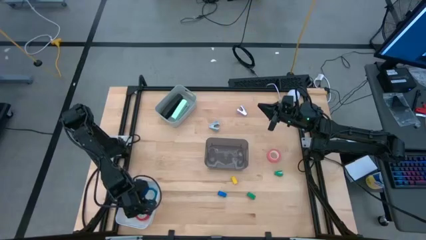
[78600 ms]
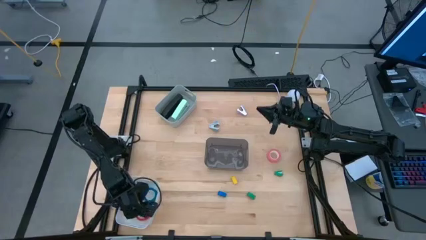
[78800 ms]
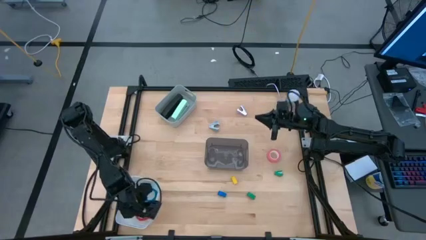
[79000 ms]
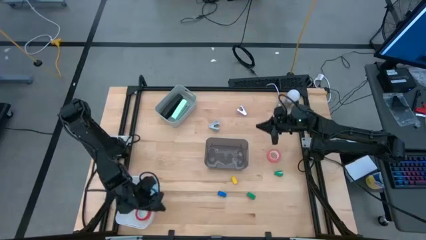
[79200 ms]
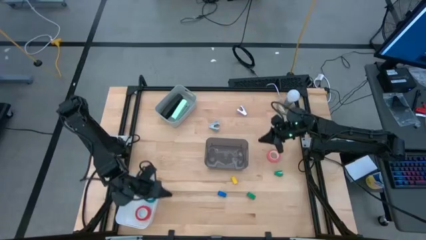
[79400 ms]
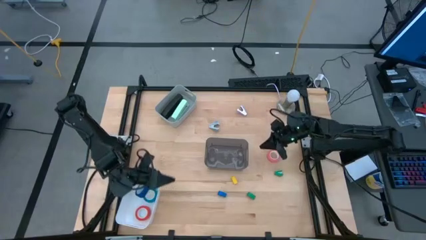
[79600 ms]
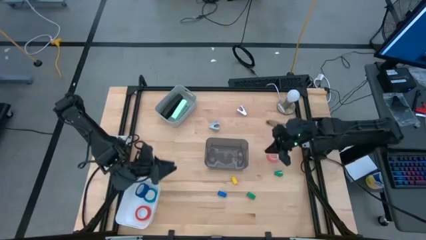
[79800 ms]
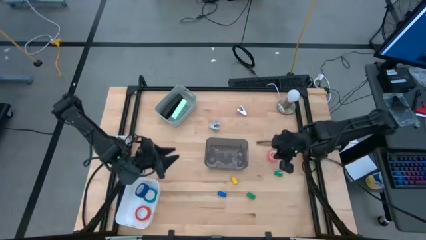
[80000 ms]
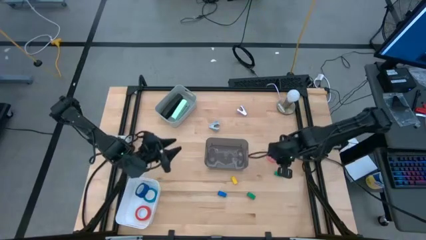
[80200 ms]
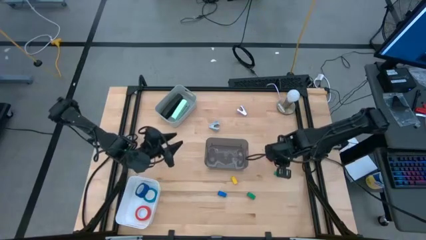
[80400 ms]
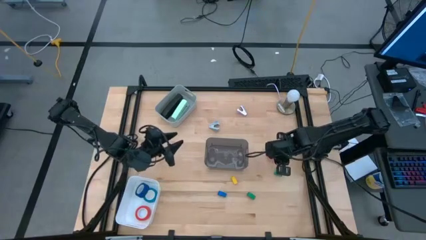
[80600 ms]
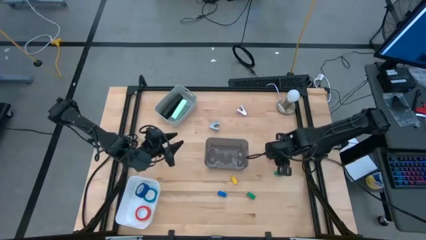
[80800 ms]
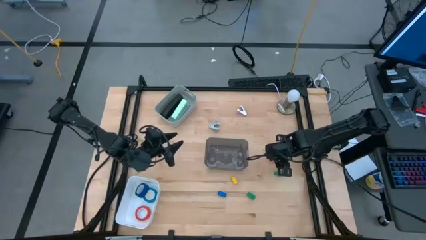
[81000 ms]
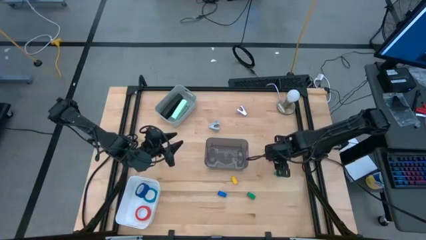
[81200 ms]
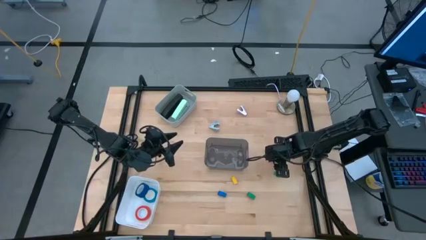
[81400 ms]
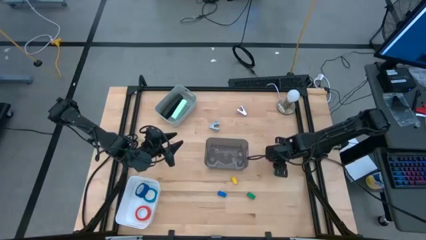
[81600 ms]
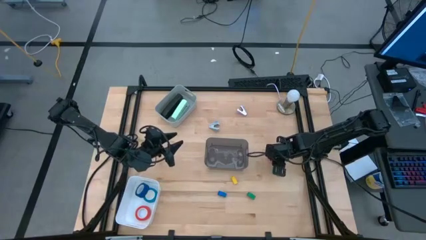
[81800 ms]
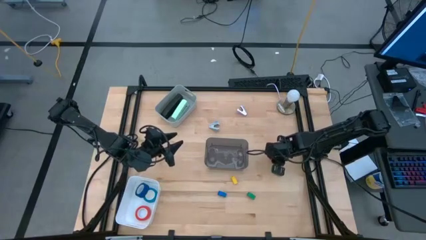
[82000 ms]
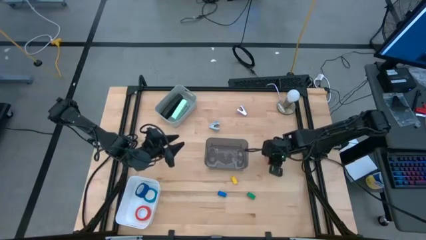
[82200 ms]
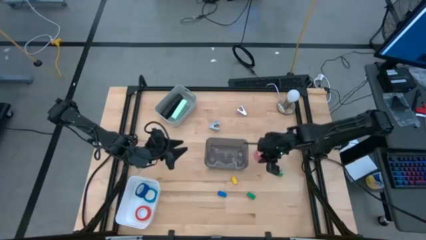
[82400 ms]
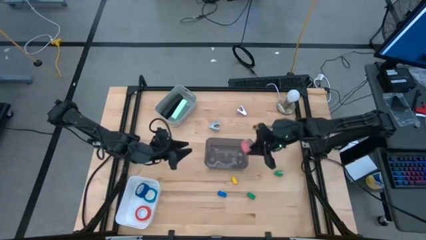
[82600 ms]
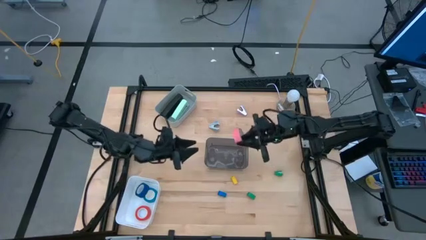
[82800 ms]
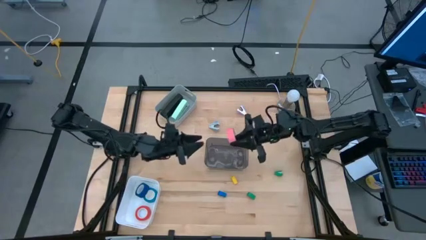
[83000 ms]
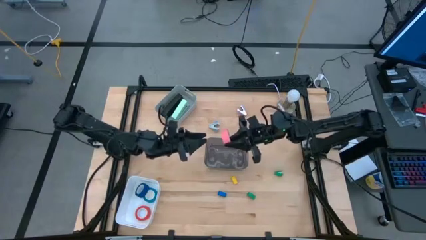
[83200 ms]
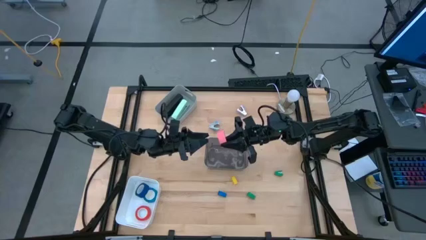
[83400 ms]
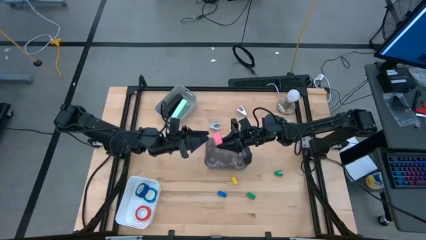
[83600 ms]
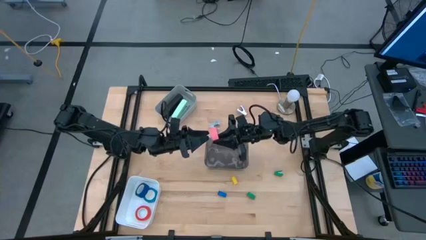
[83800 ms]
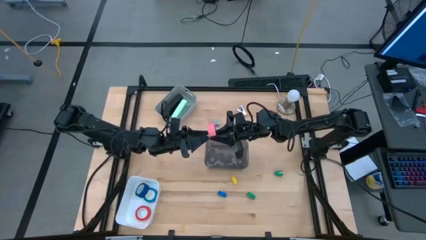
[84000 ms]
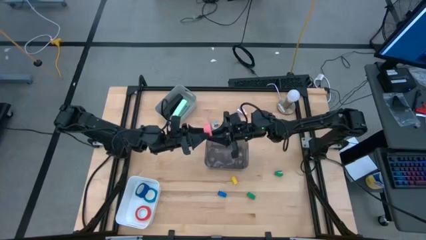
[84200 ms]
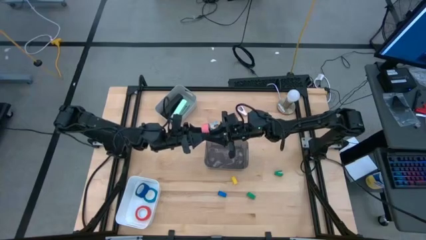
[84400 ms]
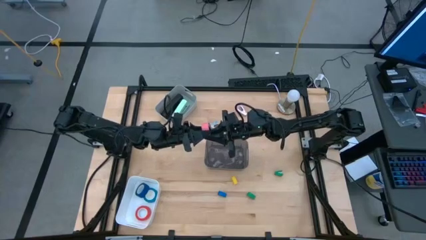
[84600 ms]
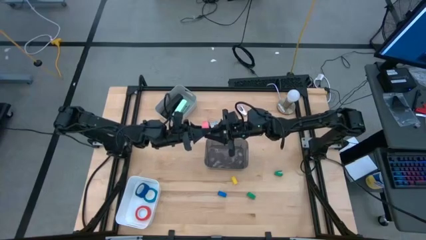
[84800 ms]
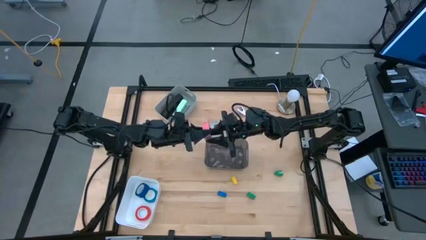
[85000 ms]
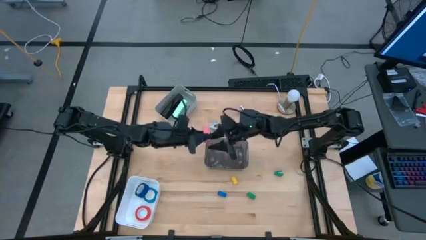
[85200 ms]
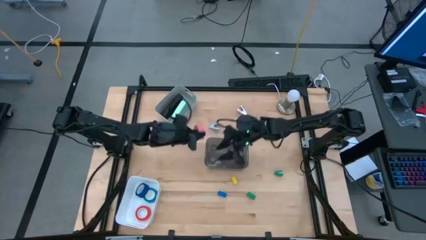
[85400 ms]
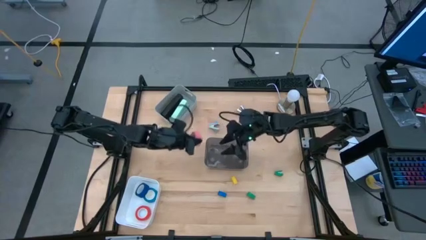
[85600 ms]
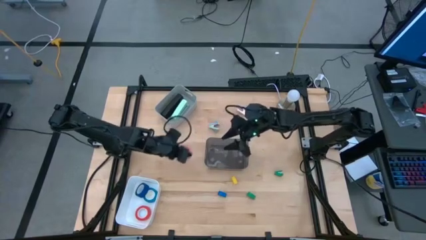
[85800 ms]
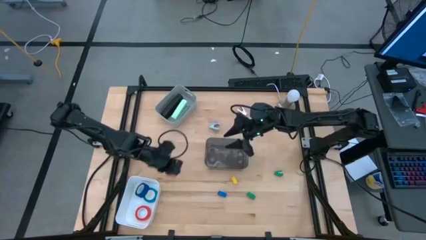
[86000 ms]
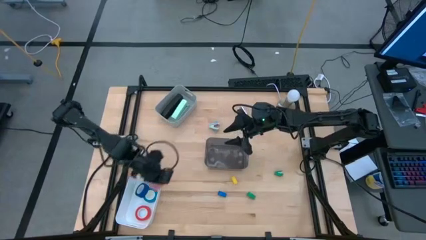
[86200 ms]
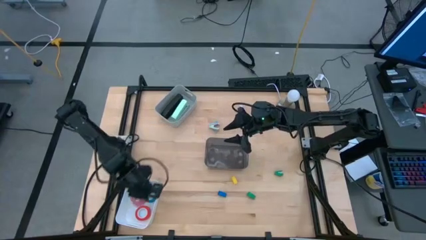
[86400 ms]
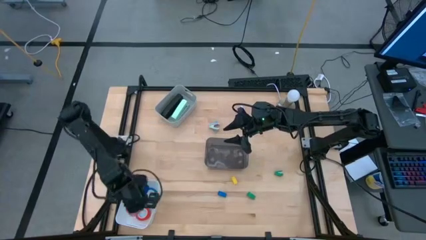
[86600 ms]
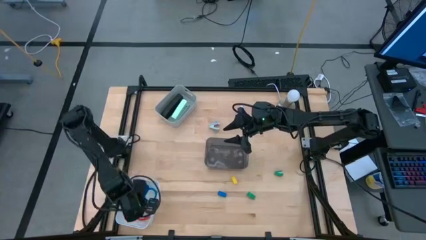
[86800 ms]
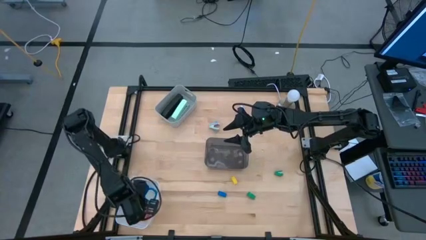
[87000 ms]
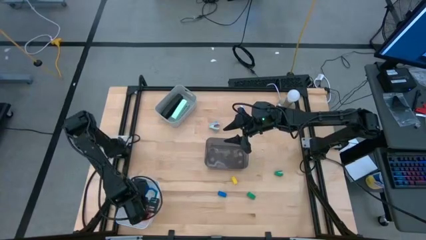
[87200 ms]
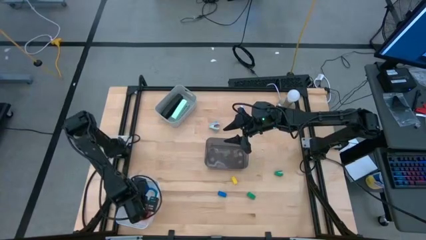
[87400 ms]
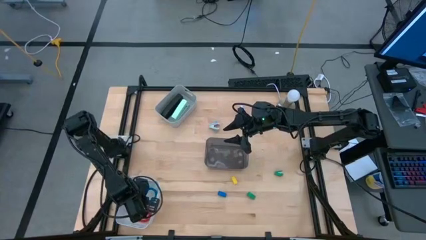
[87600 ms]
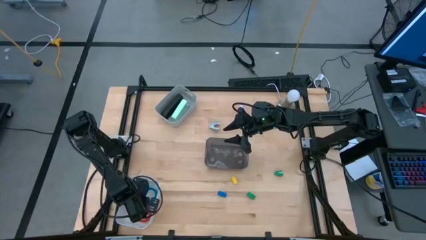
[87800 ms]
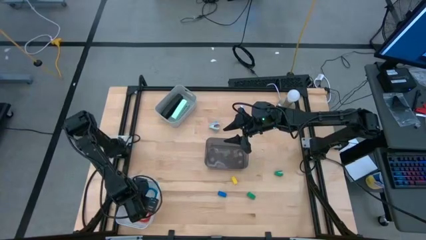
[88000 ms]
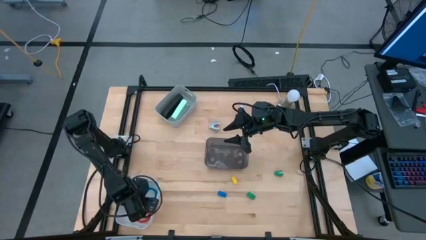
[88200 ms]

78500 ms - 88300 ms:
Task: Pick and place Stapler, Stapler remover, tape
Put the pink tape into the white bin

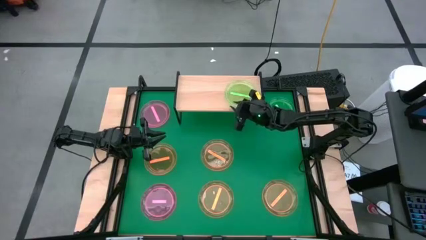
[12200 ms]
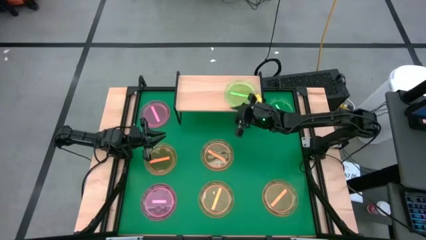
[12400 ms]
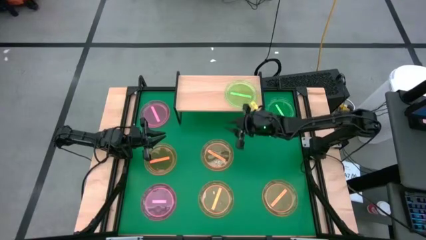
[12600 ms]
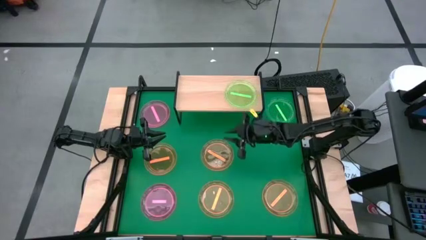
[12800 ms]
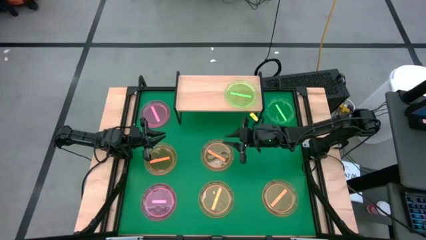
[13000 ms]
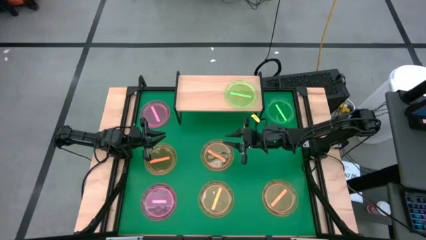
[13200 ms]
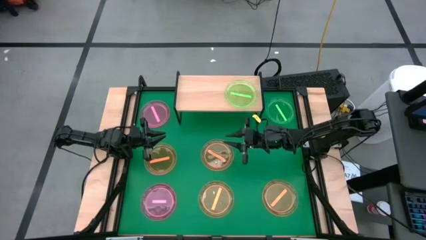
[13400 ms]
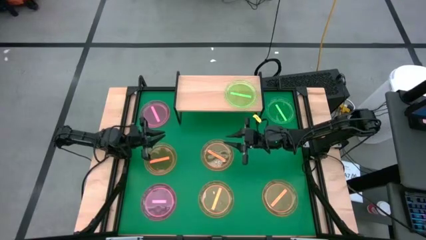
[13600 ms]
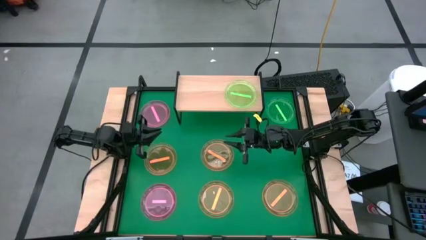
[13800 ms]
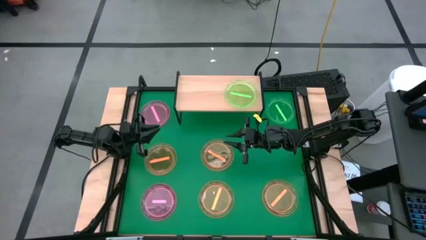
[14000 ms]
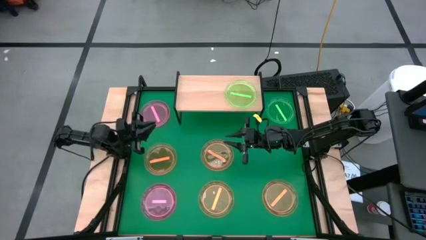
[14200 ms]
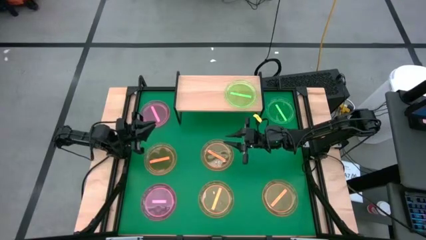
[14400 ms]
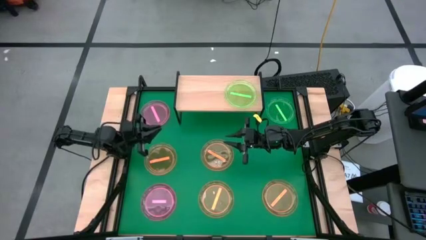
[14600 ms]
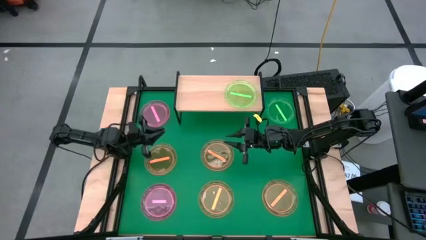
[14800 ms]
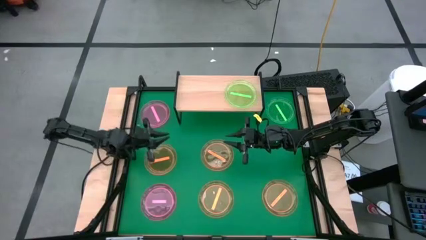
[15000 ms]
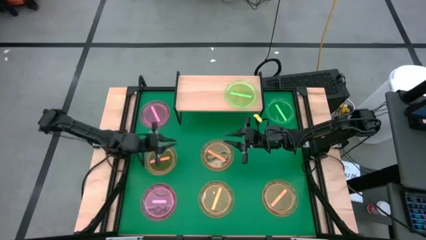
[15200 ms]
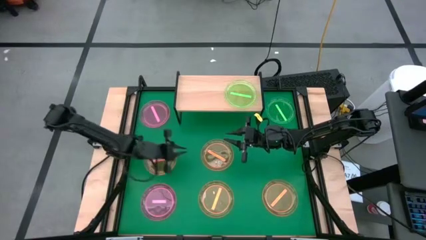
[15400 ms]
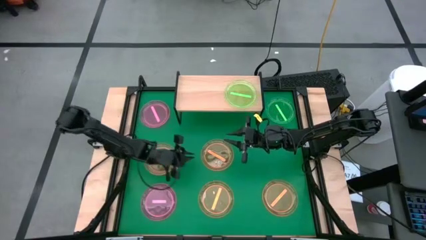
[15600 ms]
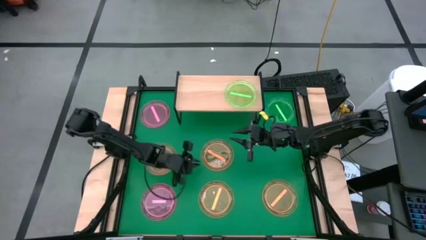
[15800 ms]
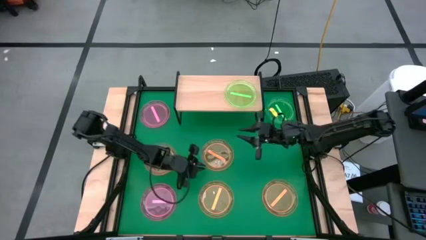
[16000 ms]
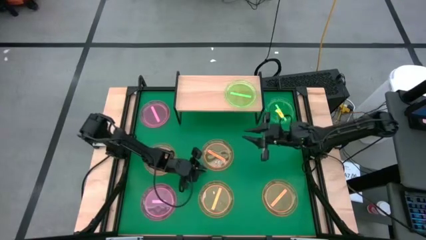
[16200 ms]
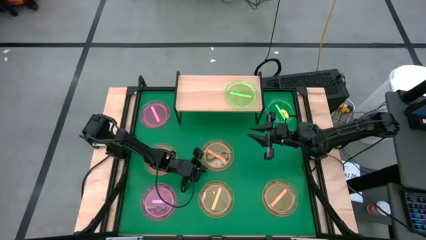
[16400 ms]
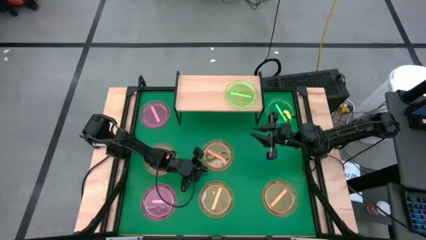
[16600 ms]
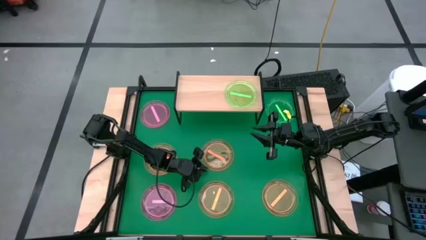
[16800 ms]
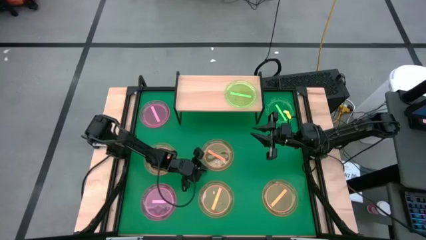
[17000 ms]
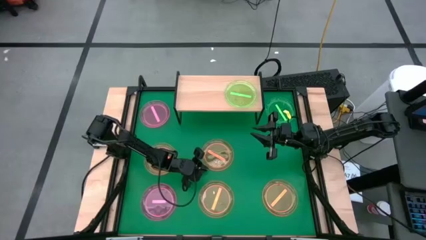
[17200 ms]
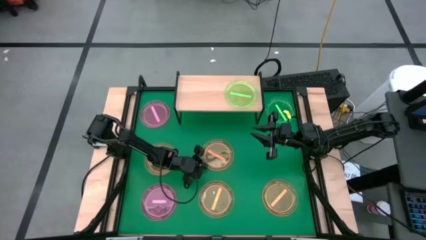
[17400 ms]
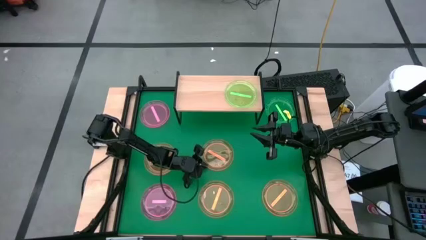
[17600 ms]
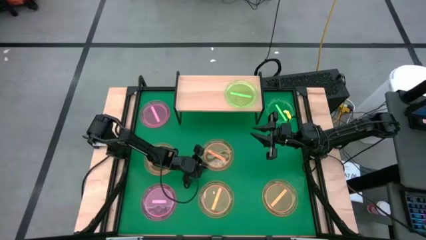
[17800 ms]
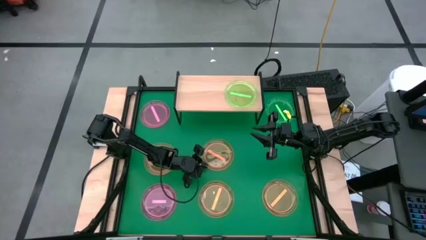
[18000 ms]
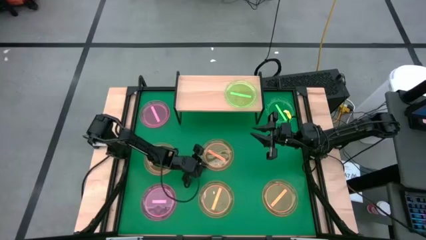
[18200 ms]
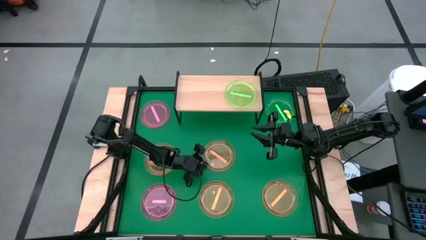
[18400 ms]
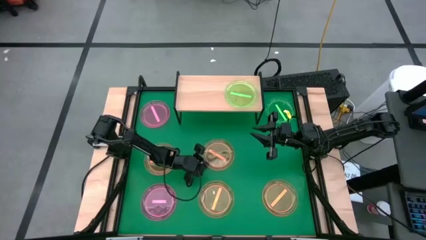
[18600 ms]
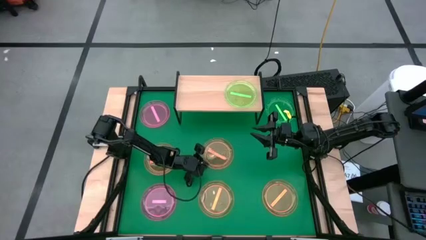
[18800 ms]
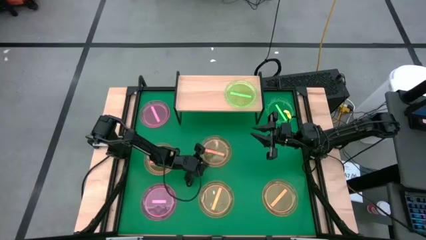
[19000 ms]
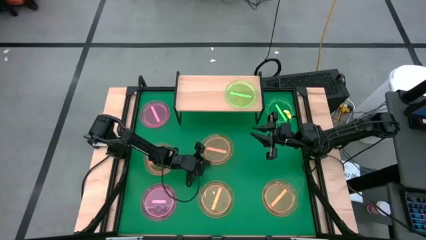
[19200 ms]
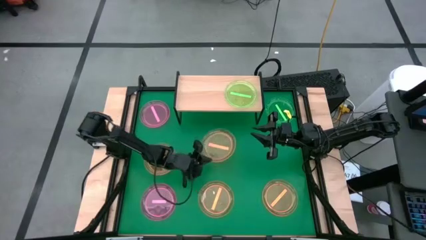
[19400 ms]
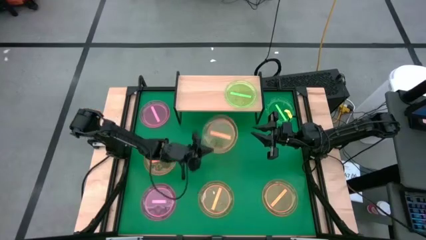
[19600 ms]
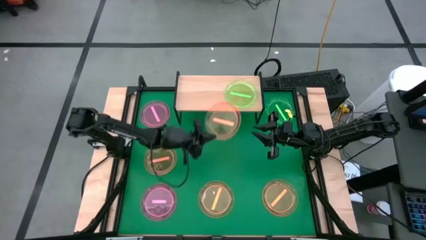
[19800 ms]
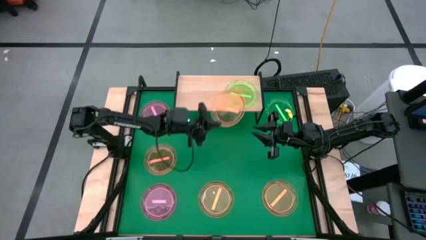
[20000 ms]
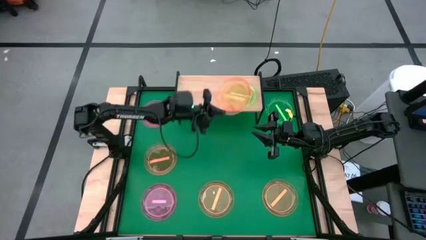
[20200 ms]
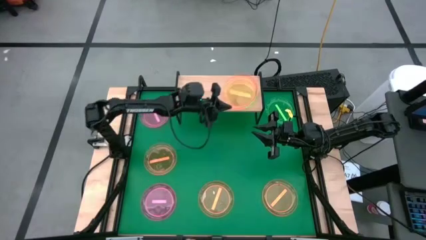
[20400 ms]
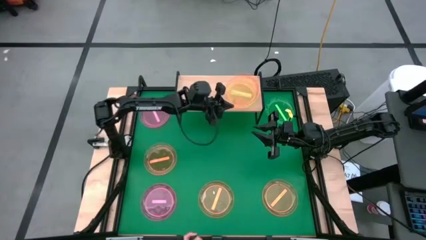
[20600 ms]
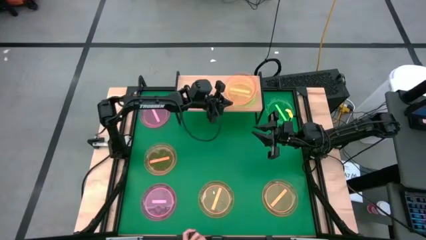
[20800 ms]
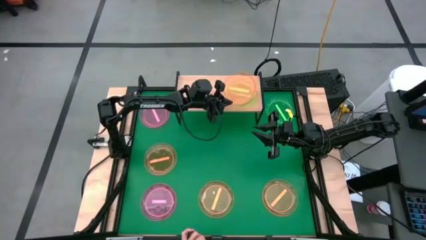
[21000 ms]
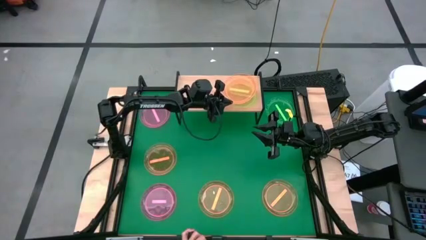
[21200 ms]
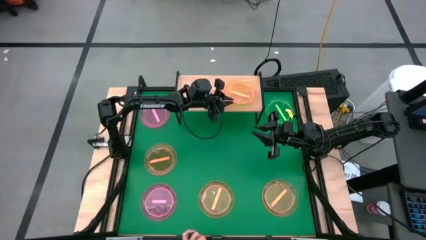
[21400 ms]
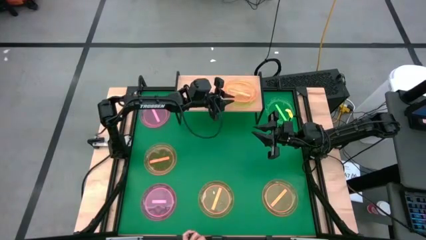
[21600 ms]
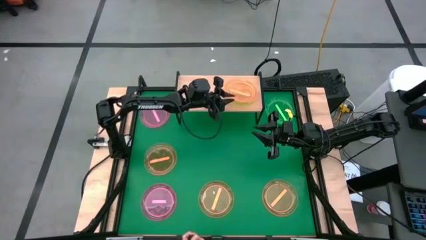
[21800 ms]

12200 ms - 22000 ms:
Task: Place and stack plates onto a shelf
Stack the orange plate on top of the green plate on the shelf
